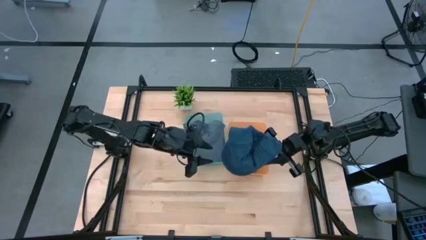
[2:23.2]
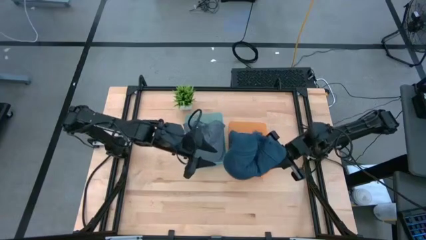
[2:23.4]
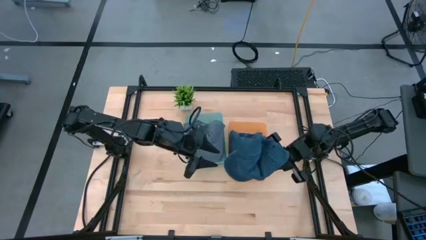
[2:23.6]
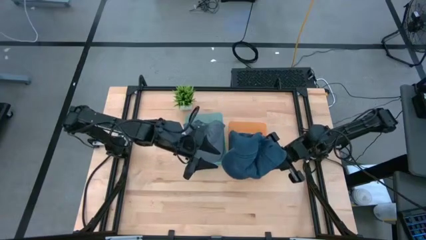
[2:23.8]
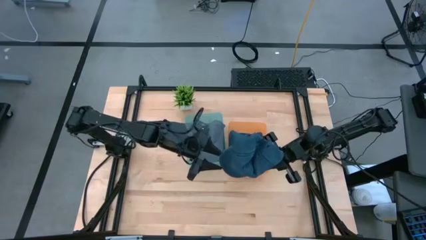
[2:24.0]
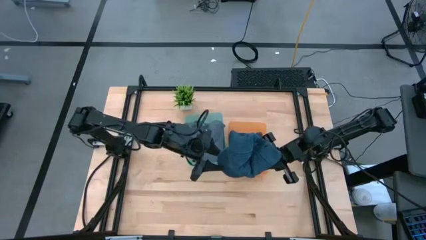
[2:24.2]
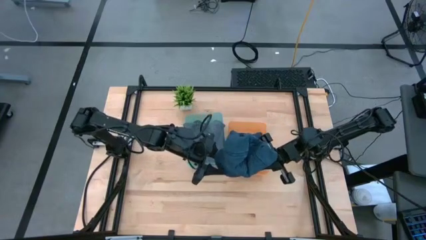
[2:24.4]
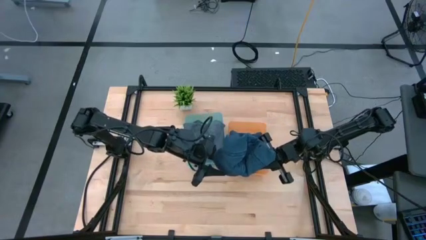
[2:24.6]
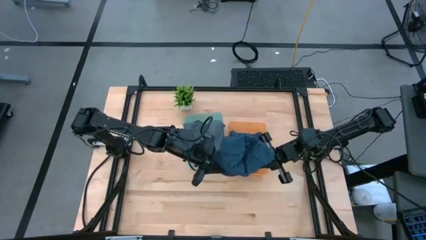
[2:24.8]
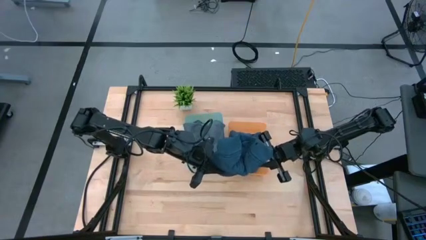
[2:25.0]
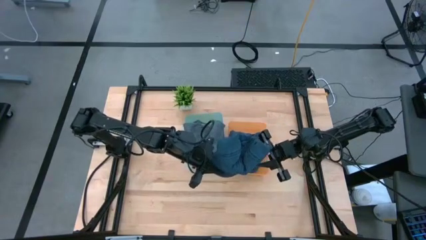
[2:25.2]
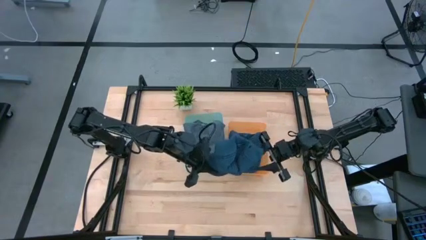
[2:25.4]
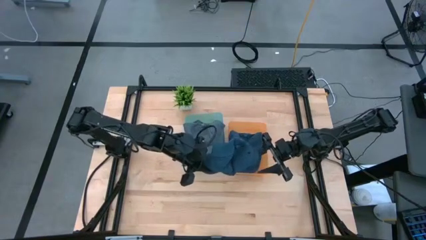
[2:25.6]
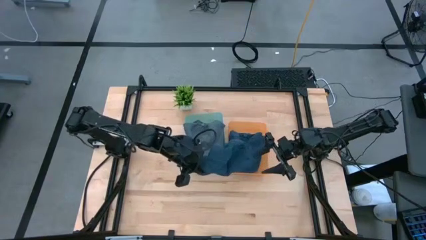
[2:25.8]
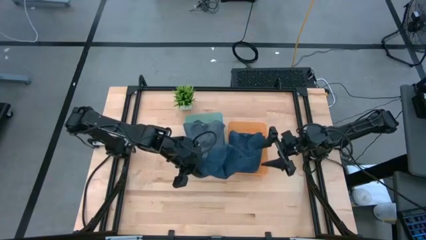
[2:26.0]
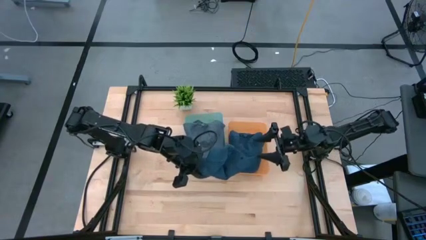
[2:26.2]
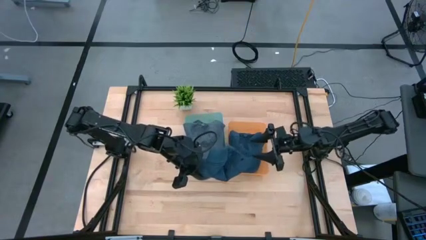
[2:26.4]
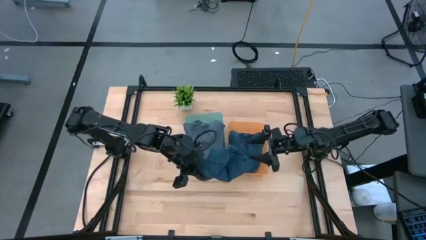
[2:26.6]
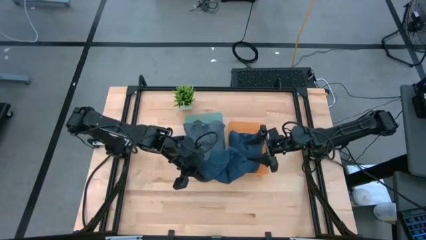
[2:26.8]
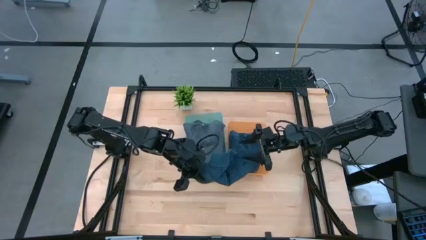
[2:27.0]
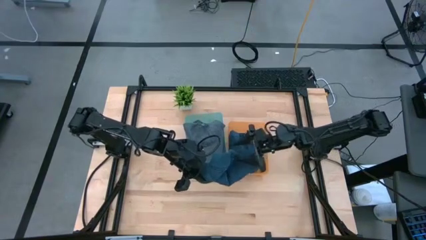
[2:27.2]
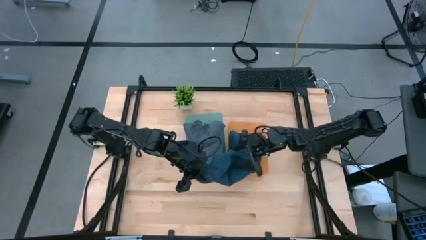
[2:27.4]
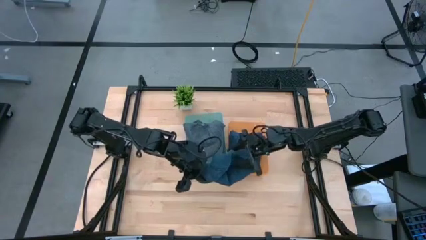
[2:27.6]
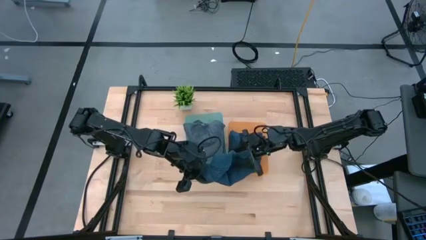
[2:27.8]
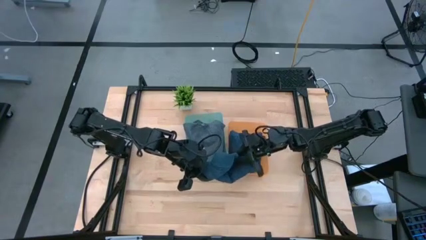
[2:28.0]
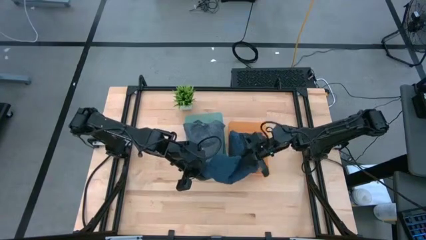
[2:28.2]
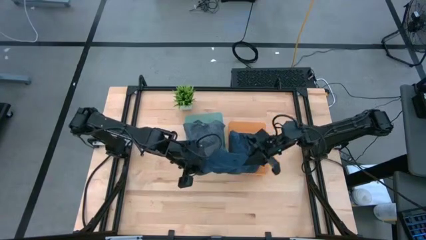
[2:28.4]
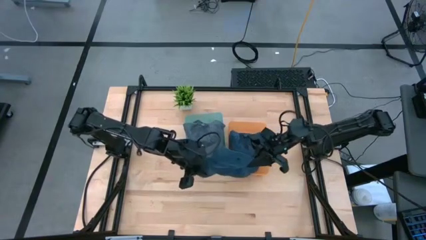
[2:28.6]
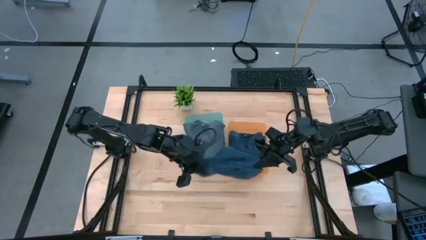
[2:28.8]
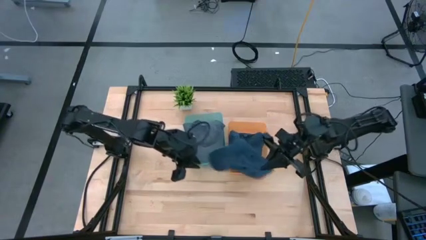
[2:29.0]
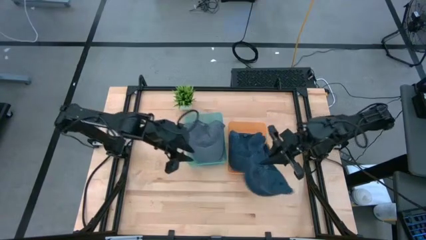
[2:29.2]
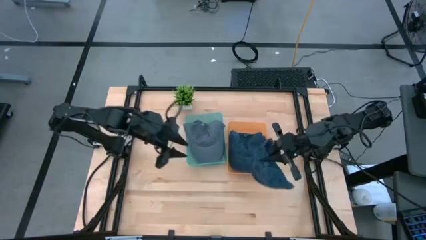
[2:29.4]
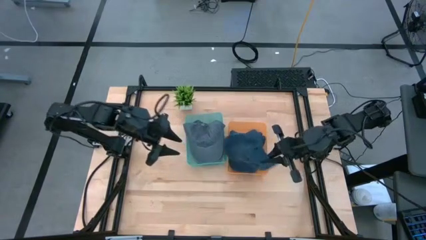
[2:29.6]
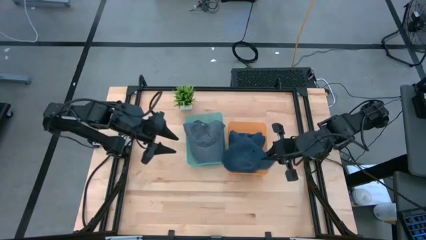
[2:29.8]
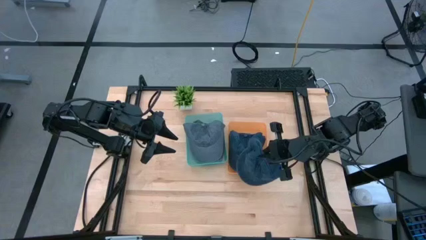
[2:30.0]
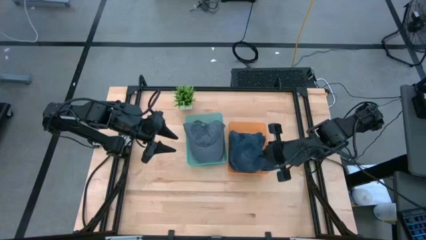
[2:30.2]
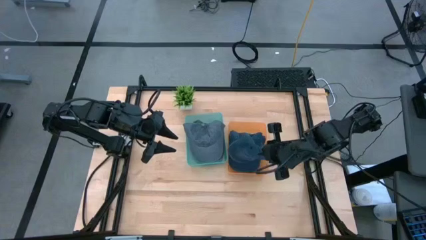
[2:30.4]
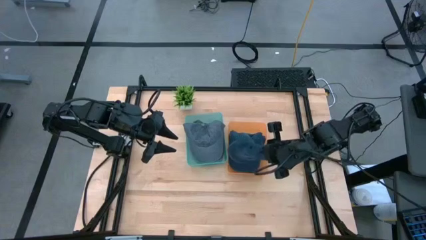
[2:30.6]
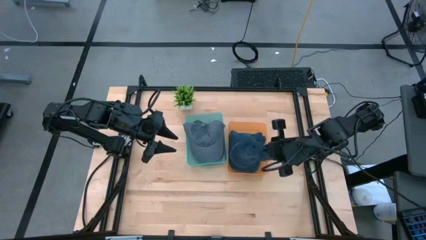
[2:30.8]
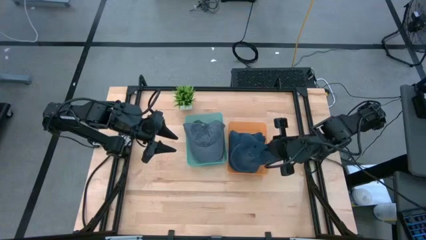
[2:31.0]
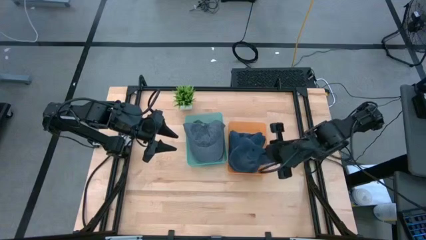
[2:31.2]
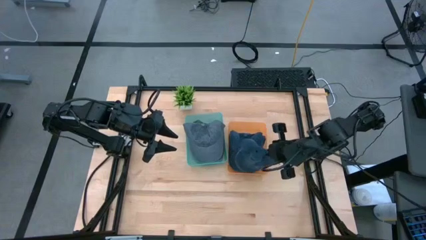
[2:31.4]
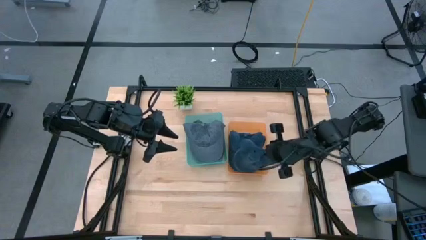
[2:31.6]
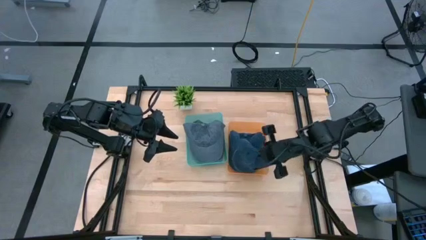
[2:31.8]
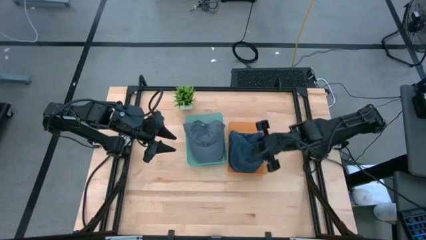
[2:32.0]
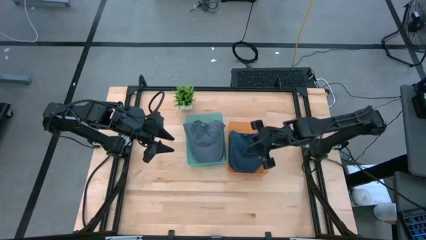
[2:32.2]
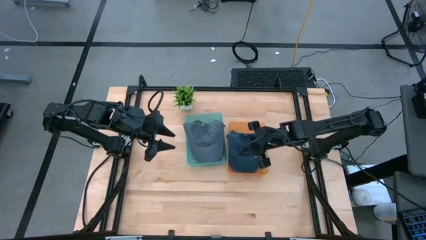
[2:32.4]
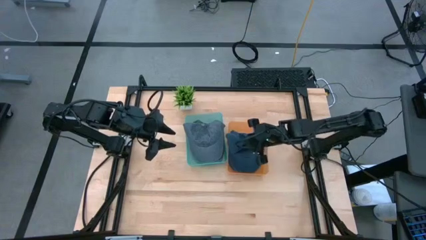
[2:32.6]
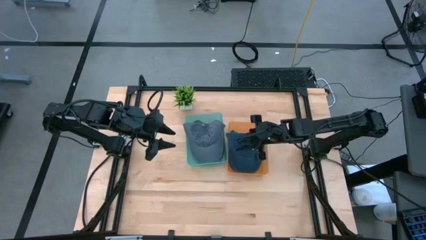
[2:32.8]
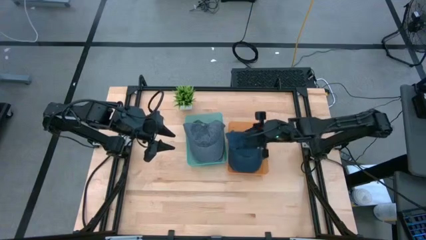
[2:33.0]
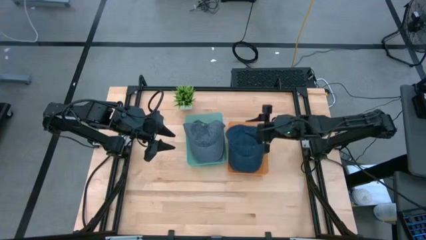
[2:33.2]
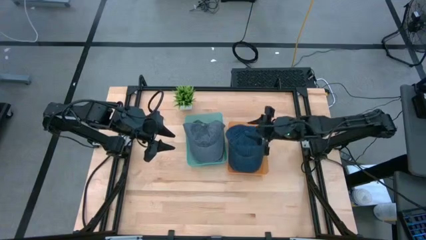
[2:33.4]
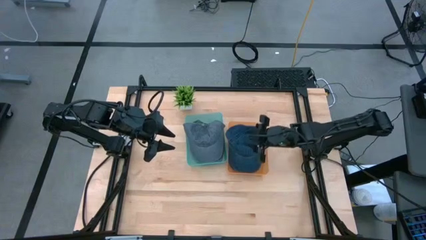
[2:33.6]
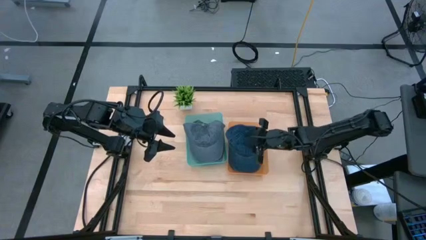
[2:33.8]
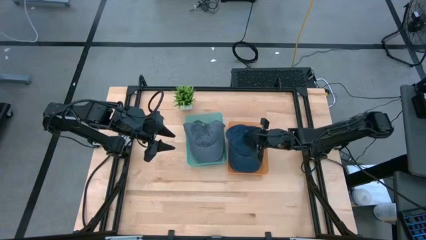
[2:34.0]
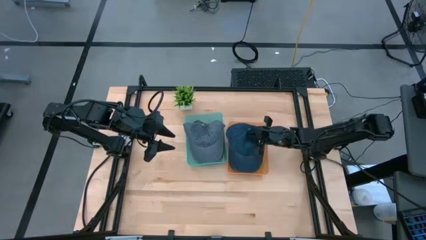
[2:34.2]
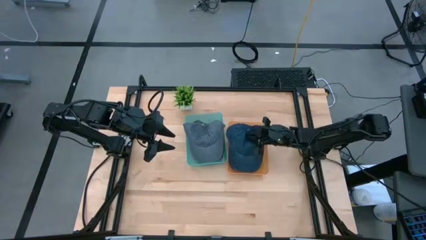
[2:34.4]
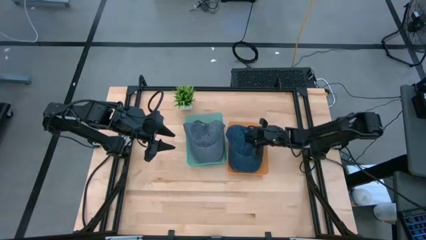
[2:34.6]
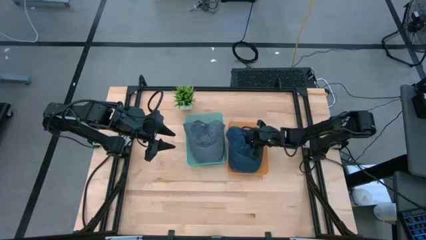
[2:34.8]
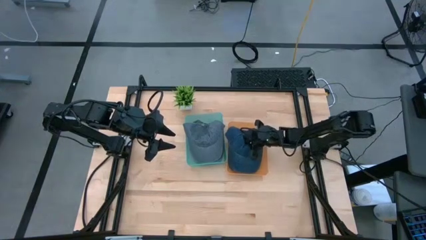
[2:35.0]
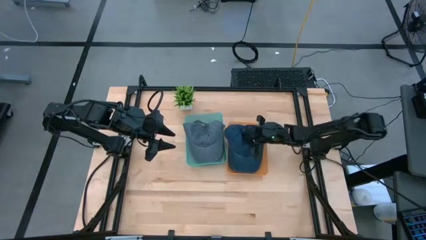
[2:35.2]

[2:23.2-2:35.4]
Task: Pick & Place hat
Put the blue cap into the orange bin

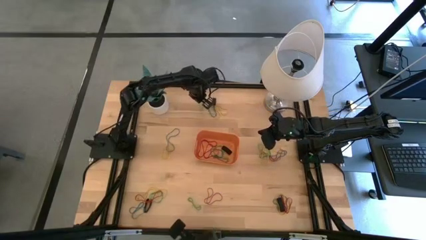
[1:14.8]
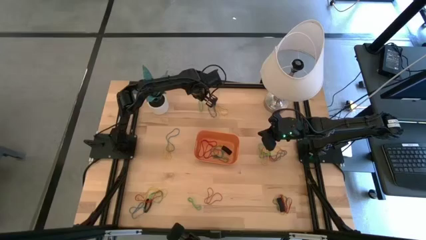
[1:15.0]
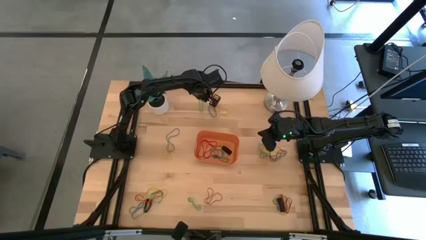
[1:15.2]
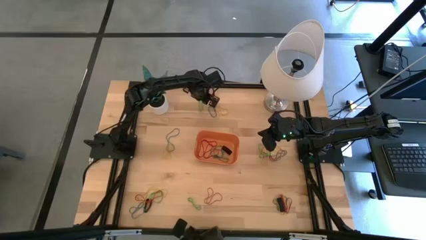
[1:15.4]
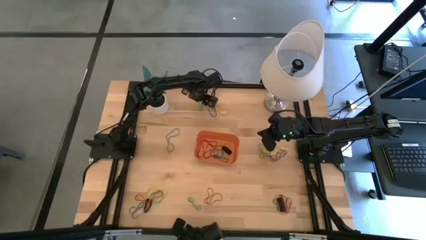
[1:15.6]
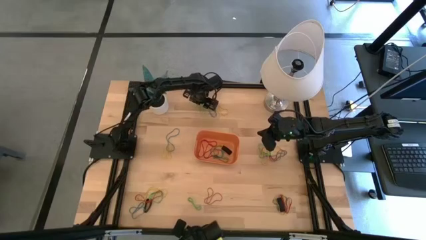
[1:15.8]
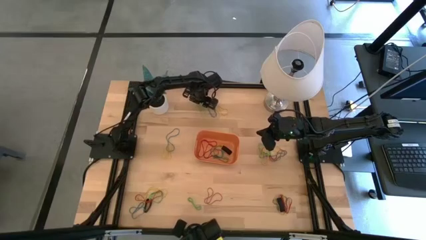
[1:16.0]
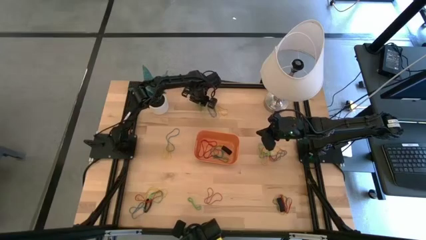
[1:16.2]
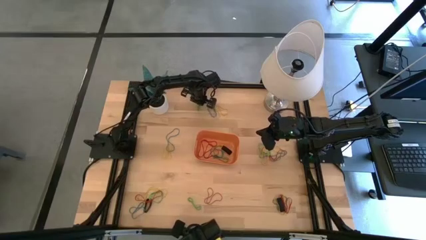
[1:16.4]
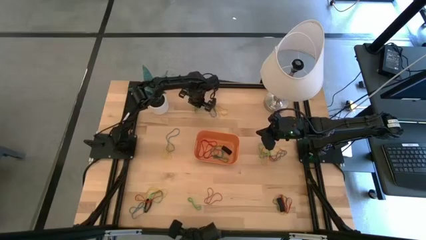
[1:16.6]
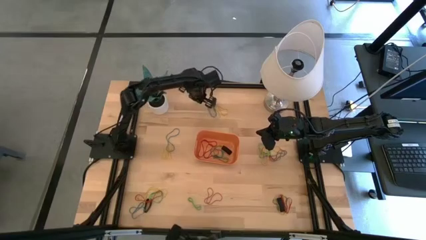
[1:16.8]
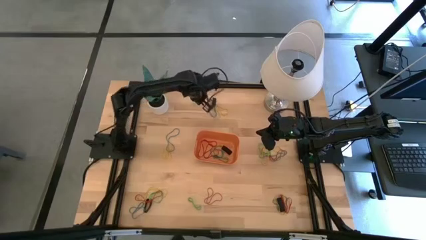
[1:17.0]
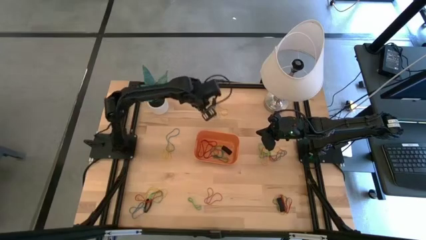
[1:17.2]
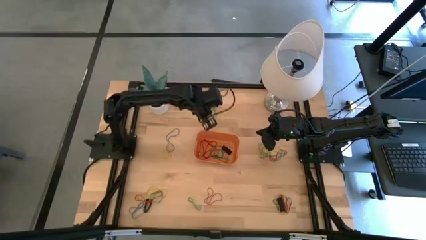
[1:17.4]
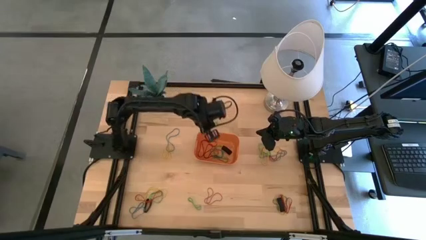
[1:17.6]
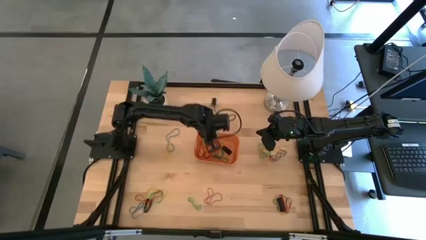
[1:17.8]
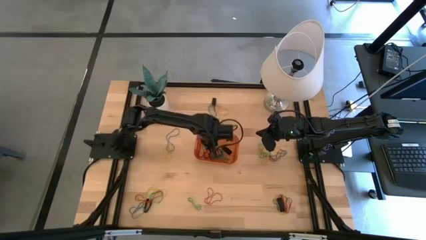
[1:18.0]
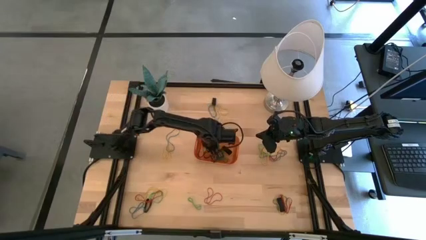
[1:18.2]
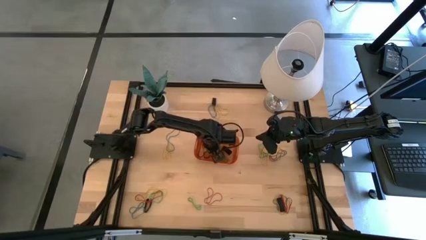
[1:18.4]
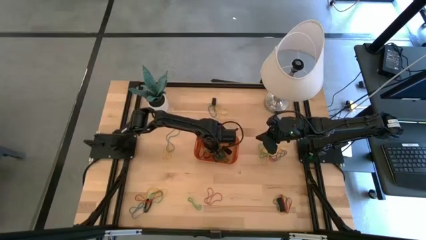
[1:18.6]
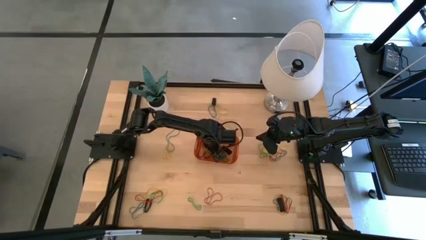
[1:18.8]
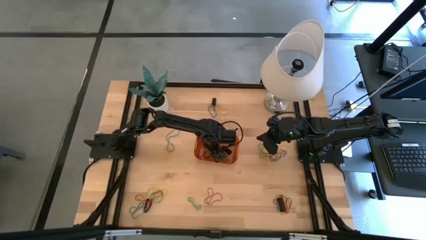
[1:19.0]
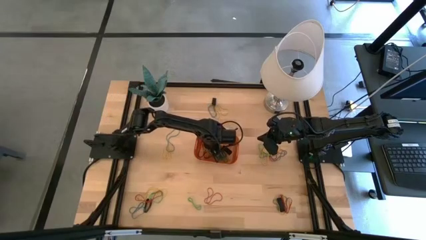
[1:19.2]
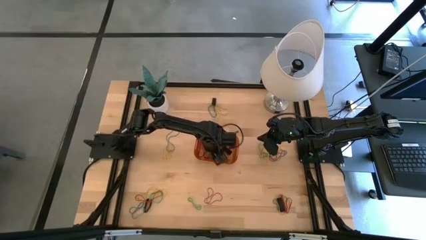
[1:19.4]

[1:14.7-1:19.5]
Task: Pick and place rubber bands into bin
Put the green rubber band into the orange bin
